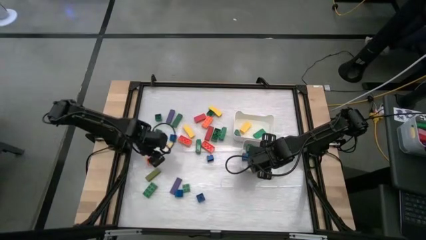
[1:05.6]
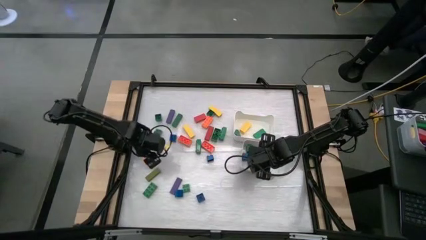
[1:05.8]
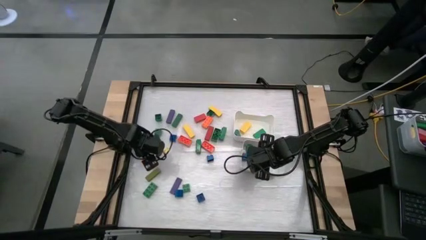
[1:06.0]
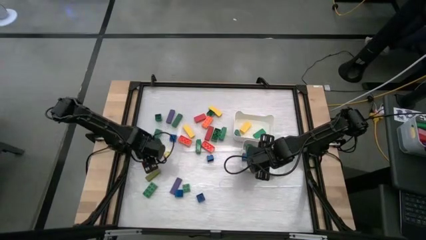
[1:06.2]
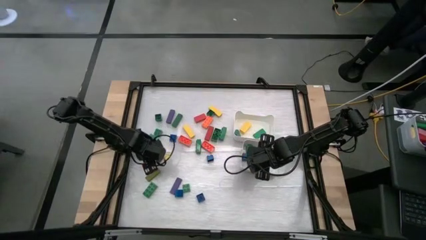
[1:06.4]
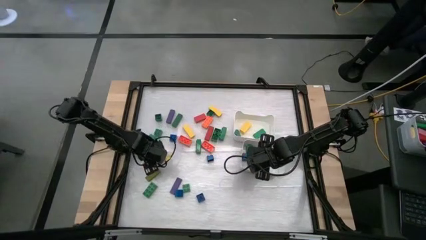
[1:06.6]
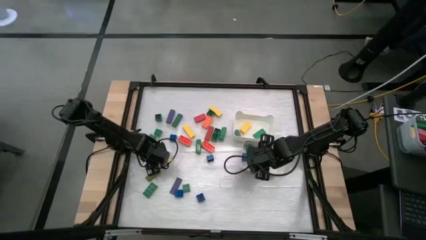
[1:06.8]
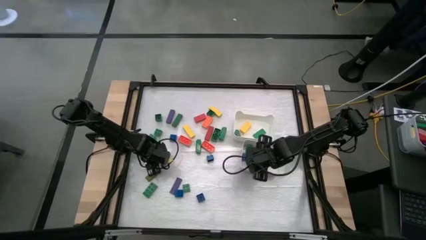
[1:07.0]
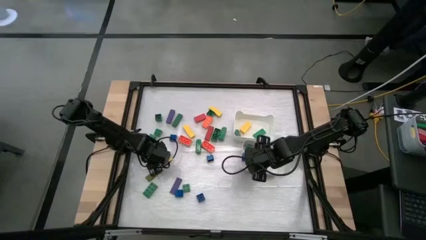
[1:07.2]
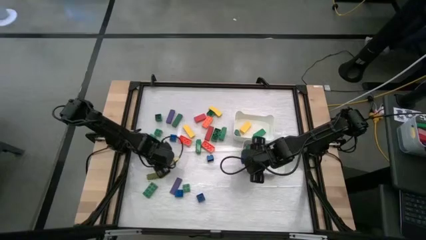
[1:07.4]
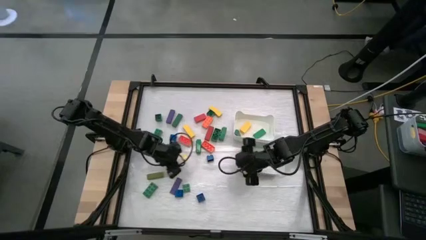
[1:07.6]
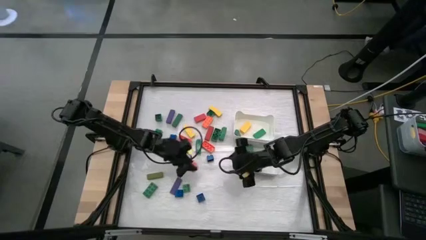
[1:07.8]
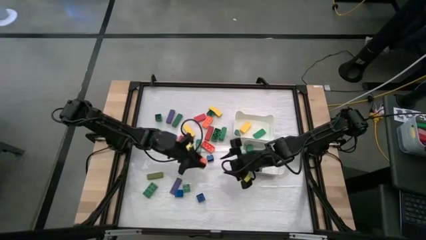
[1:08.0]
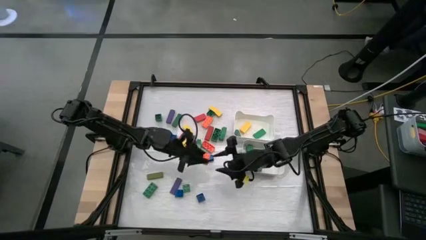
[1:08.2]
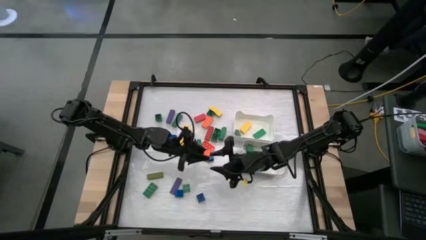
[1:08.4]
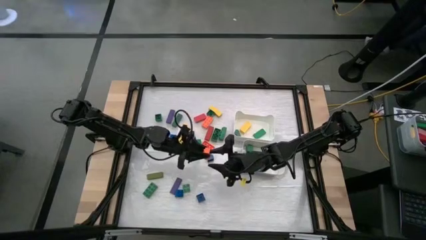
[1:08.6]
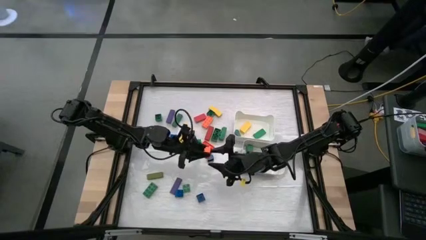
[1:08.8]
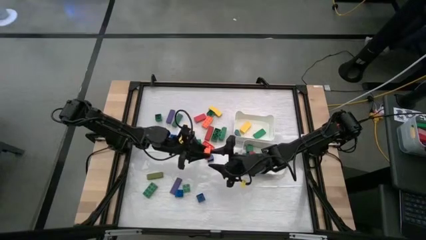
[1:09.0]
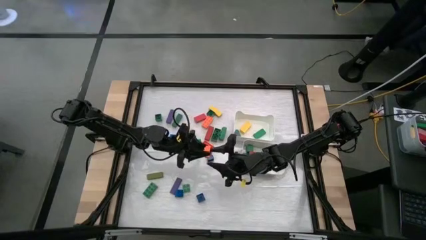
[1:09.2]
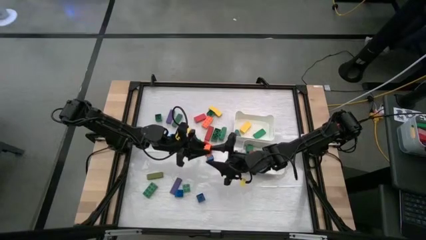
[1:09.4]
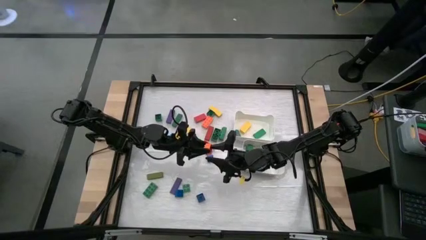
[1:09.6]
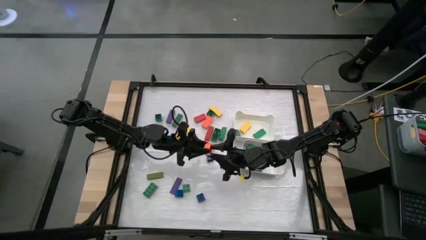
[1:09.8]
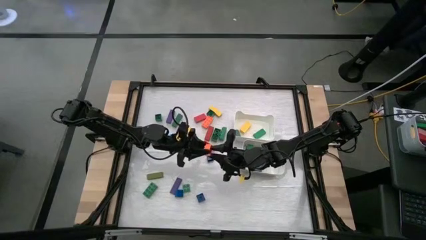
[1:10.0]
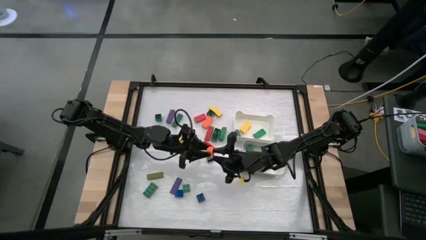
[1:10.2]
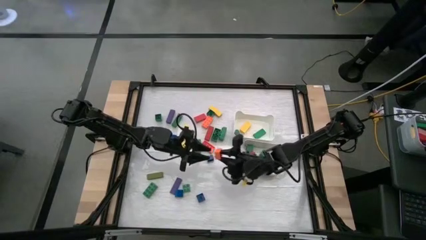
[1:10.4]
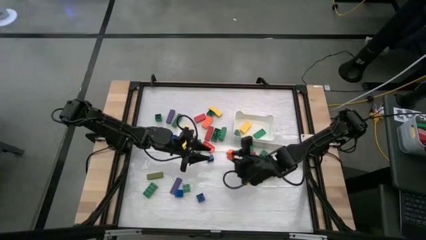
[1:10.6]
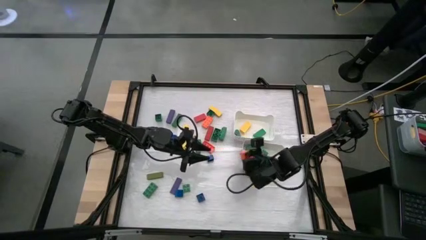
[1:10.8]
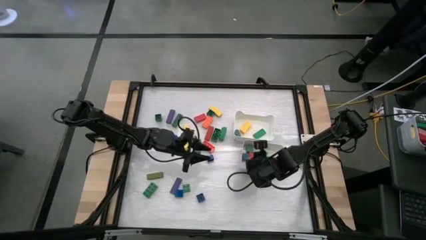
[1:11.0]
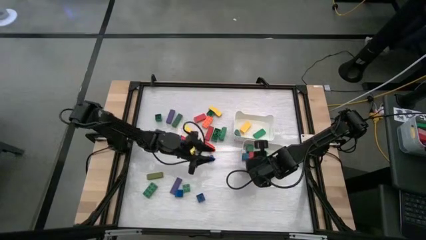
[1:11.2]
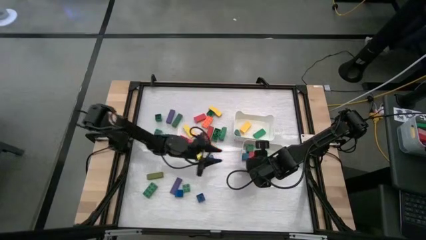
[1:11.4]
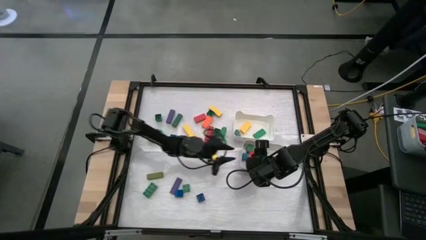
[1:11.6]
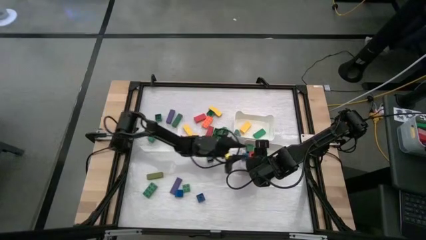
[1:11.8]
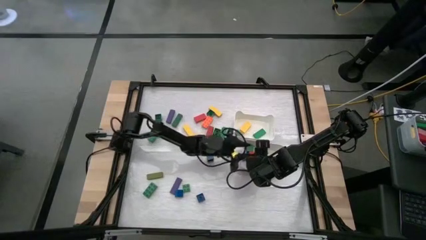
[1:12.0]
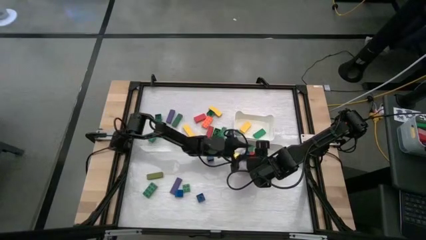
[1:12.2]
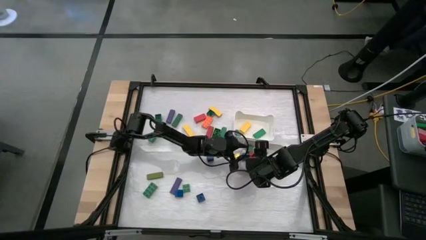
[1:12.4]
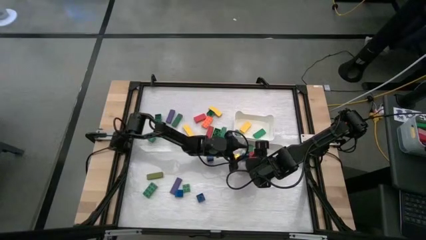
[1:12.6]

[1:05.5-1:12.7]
Task: Sort blocks by size
Put the orange cube game piece into the bottom white bin

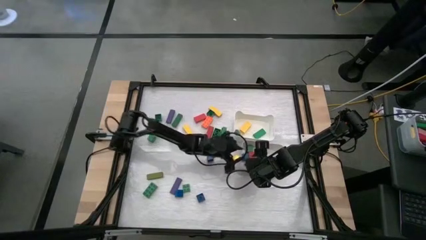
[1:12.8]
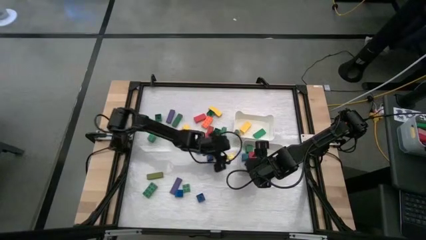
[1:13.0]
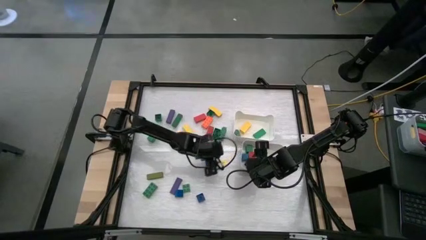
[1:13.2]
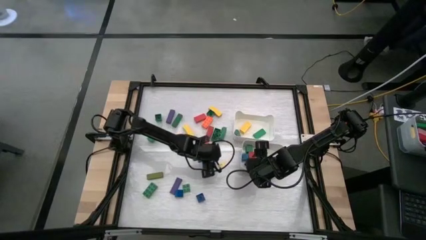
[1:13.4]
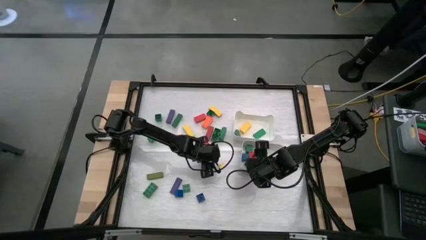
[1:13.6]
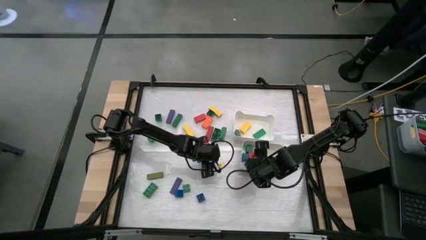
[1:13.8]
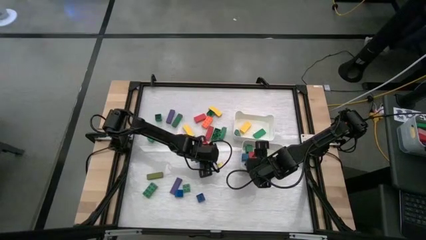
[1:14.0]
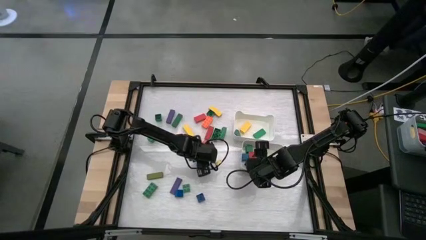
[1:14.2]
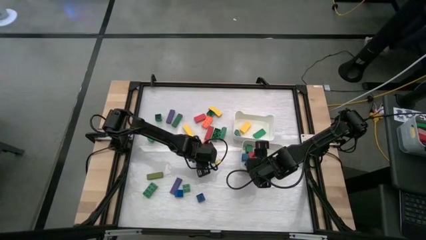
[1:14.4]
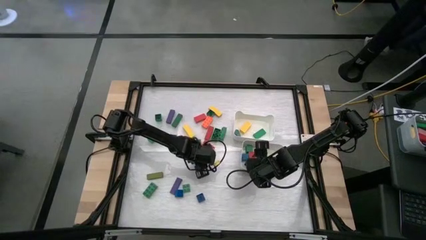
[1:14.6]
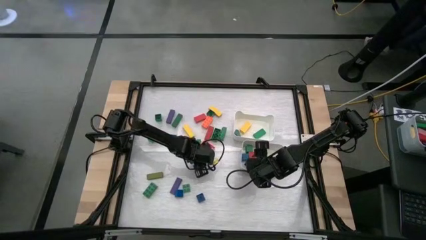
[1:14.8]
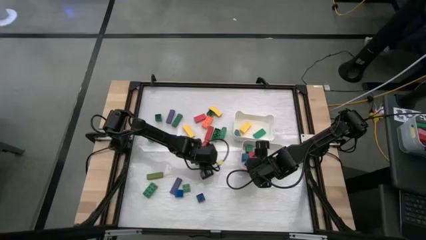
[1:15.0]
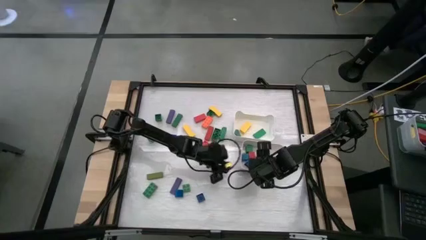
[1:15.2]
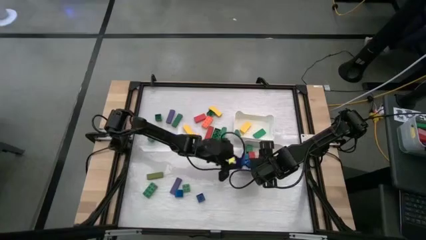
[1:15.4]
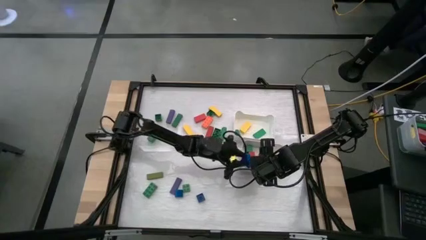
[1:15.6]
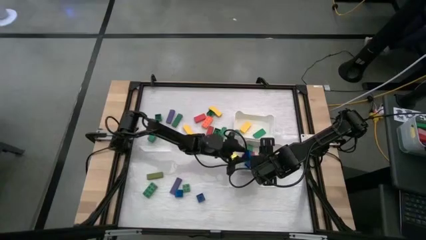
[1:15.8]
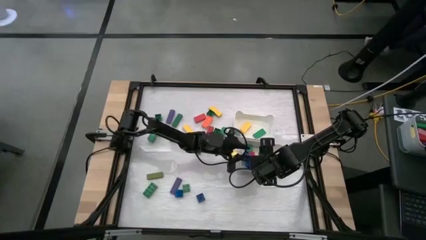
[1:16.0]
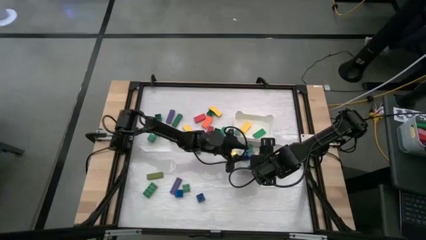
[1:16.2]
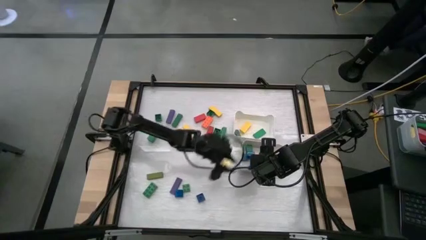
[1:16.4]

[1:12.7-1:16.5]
Put the blue cube game piece into the bottom white bin

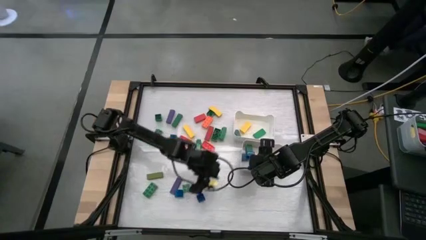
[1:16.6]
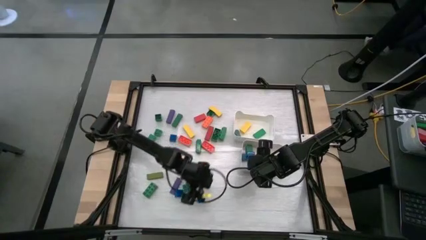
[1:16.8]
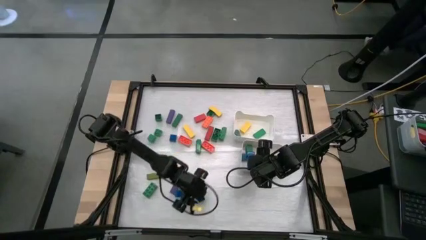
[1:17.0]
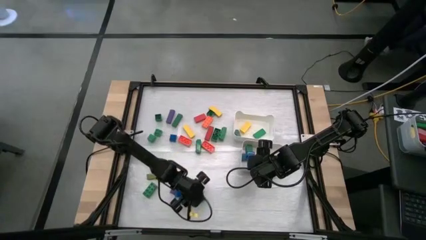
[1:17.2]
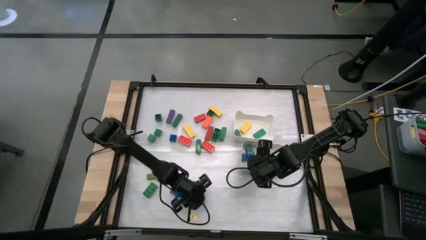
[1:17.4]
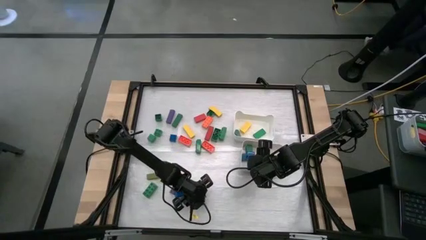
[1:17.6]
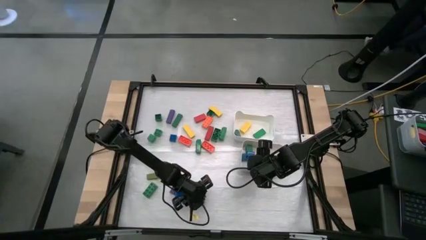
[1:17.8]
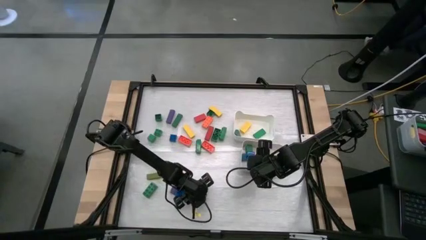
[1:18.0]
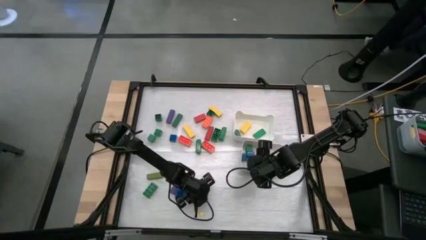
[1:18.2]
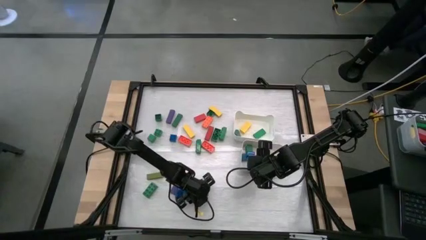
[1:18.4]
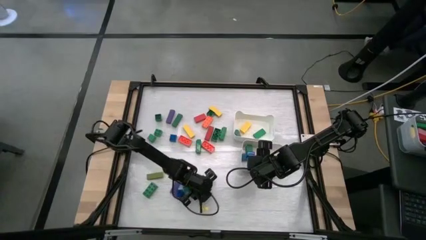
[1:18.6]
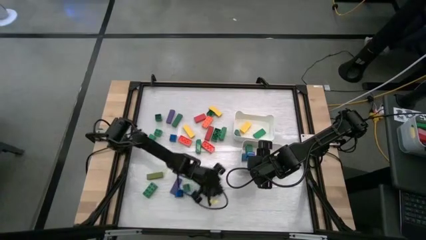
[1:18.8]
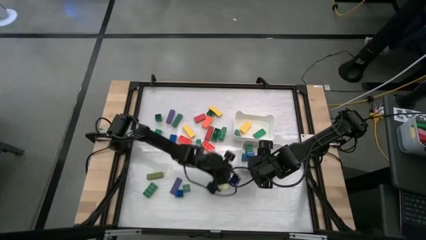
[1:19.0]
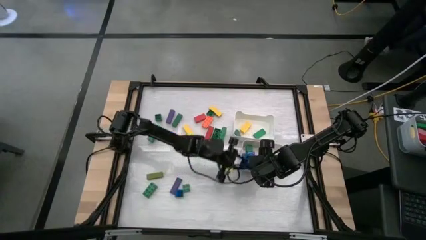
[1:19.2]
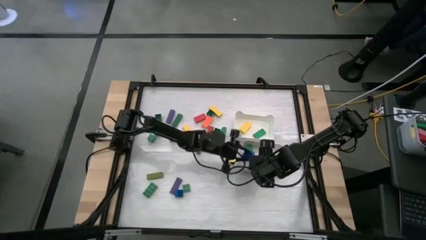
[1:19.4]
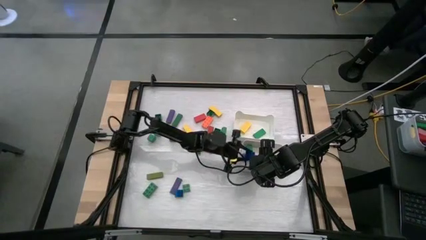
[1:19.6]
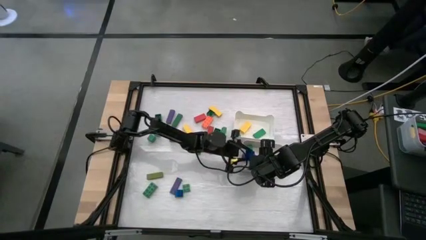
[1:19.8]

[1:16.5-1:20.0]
Put the blue cube game piece into the bottom white bin

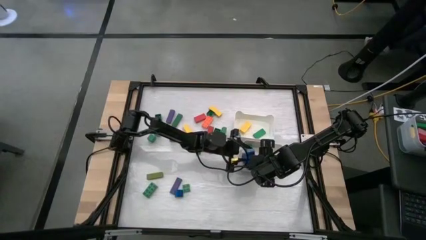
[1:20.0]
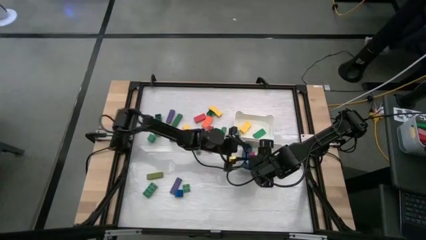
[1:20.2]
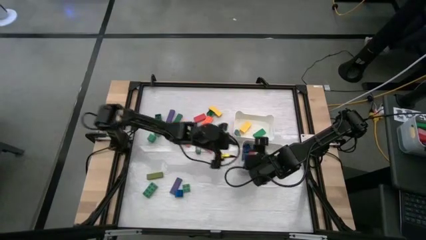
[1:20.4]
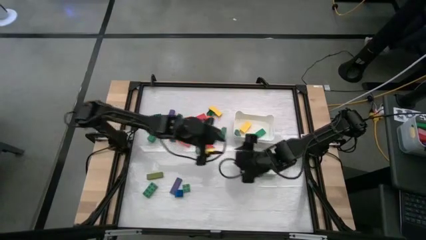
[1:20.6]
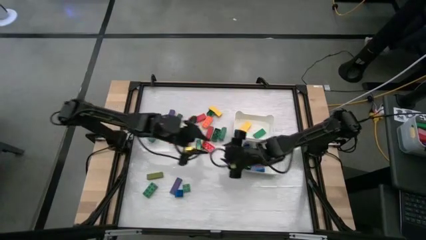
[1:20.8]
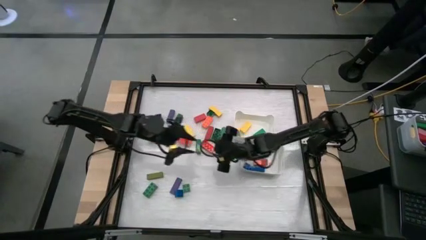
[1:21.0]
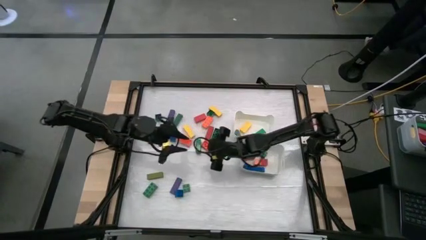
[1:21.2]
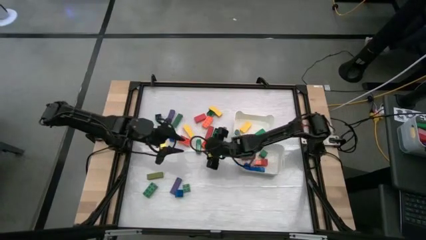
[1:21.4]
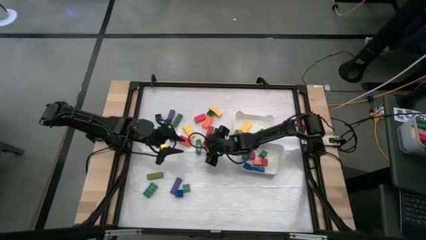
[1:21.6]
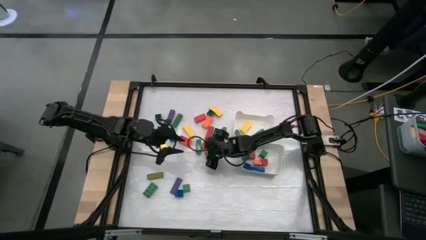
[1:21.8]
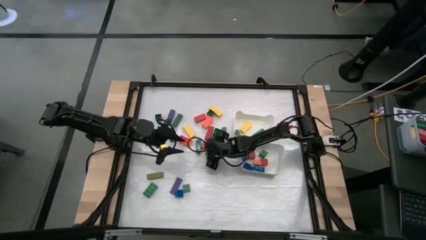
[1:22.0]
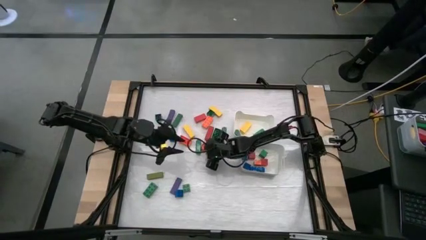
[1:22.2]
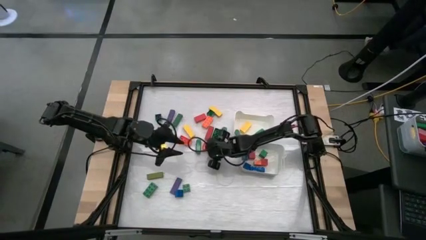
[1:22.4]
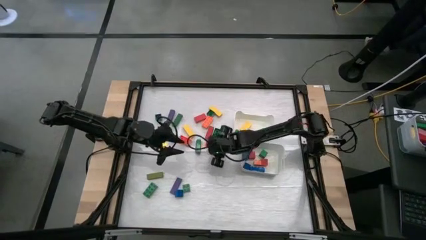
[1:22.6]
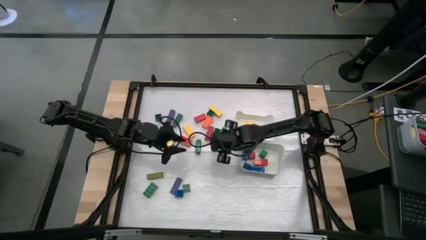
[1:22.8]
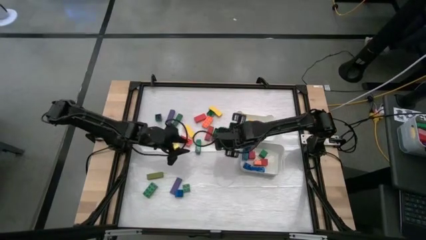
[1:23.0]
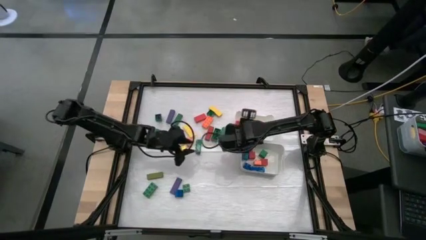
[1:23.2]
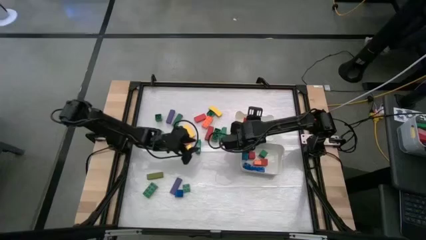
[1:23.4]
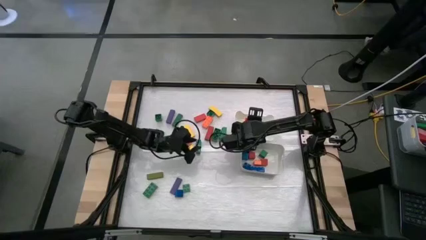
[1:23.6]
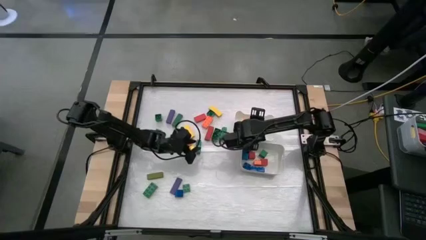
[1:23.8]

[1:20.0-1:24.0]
Put the orange rectangle game piece into the top white bin
